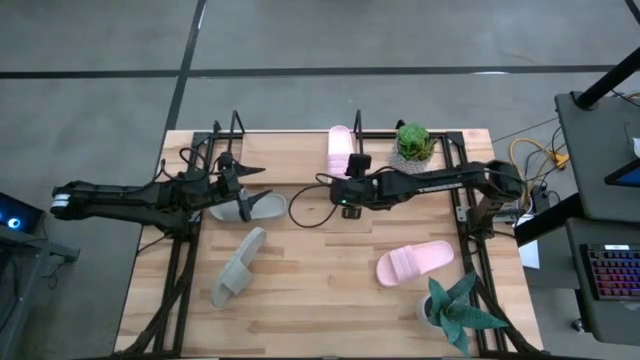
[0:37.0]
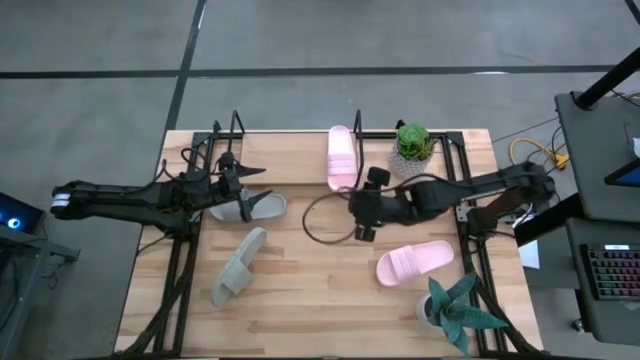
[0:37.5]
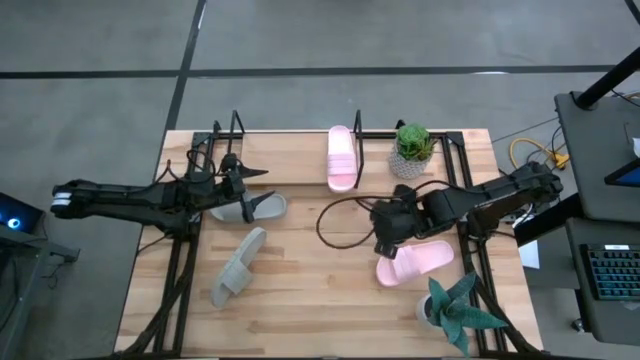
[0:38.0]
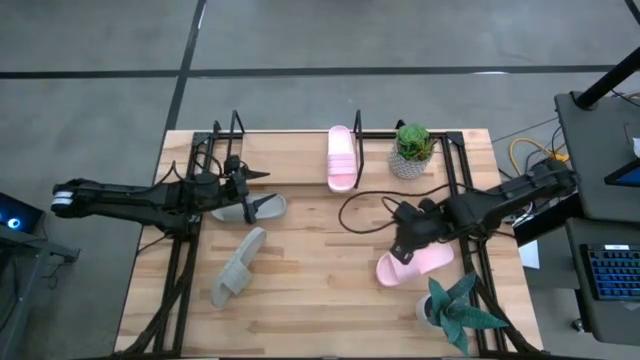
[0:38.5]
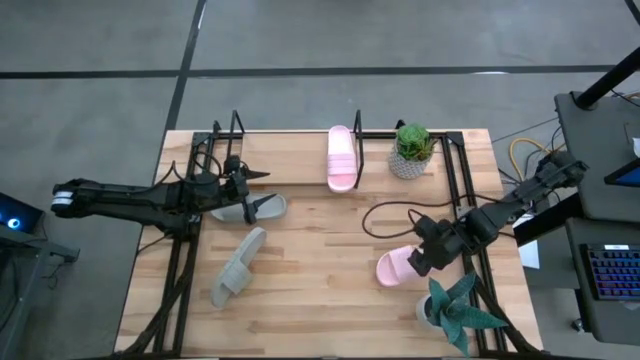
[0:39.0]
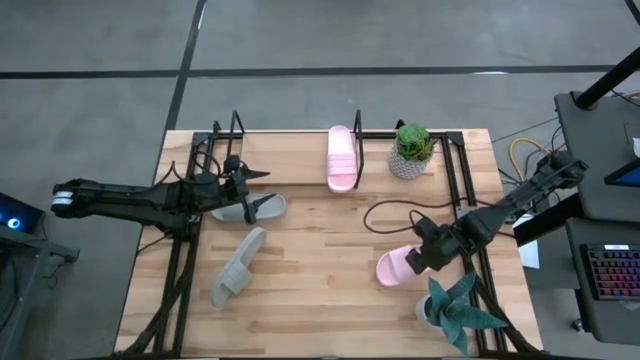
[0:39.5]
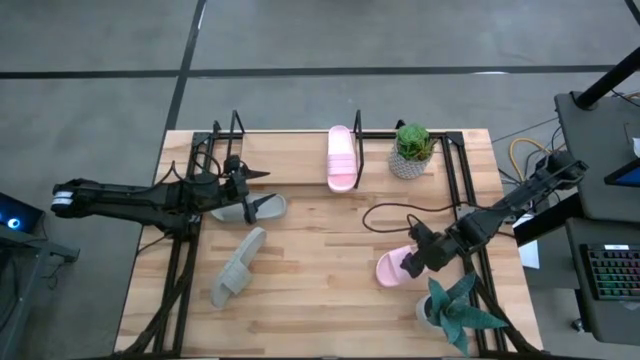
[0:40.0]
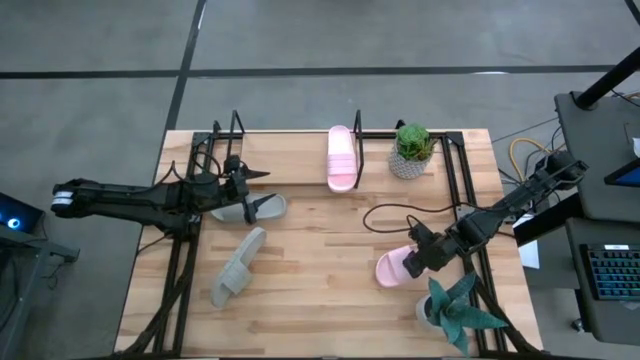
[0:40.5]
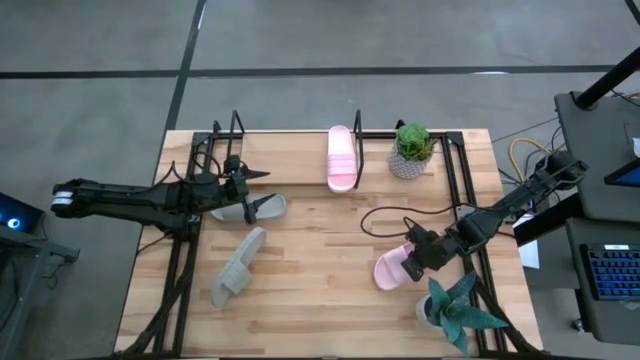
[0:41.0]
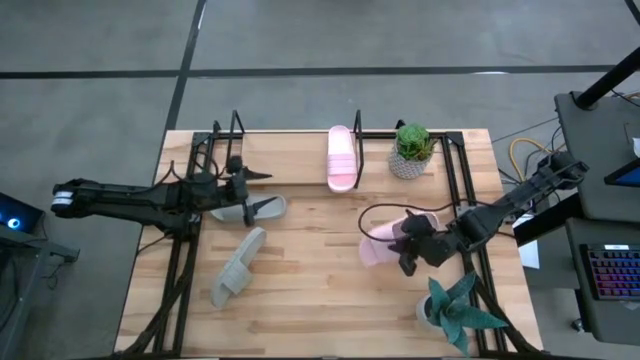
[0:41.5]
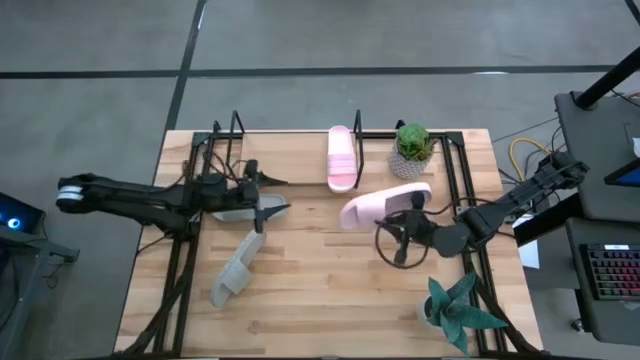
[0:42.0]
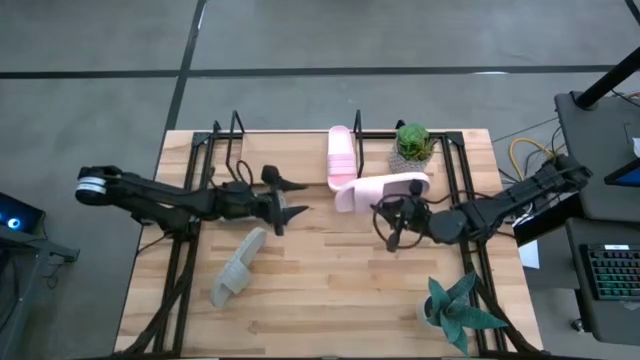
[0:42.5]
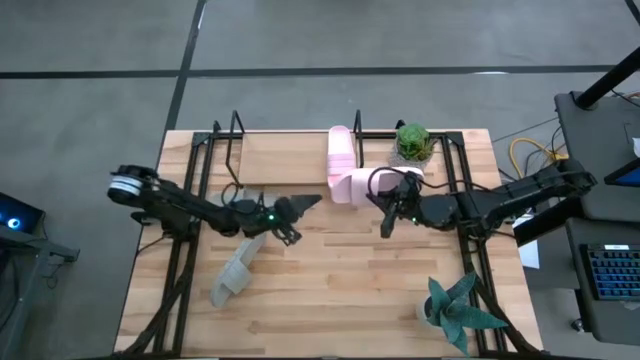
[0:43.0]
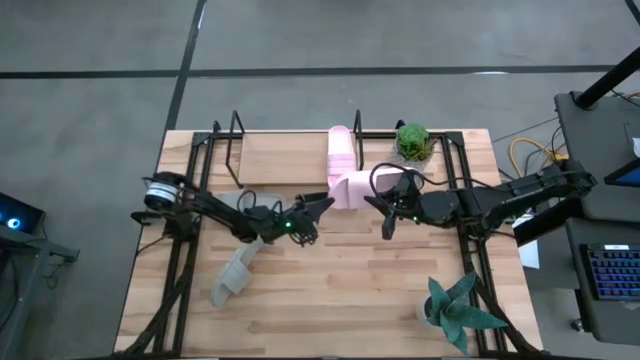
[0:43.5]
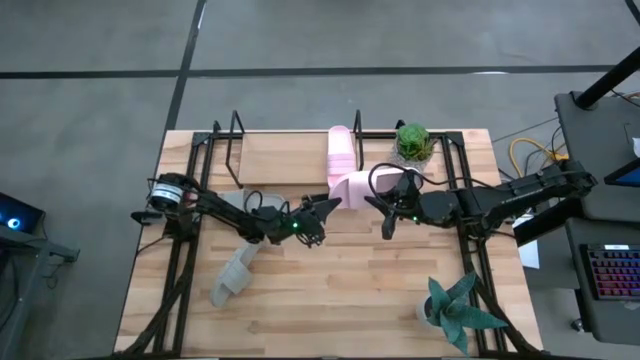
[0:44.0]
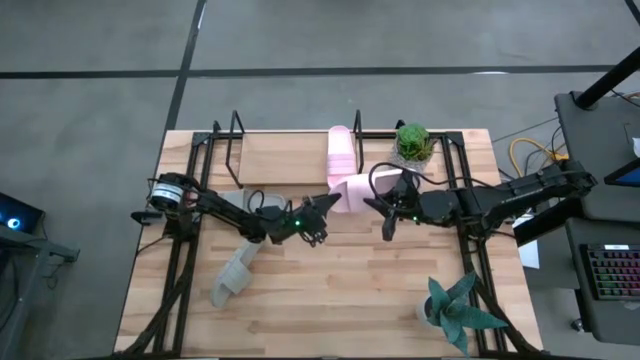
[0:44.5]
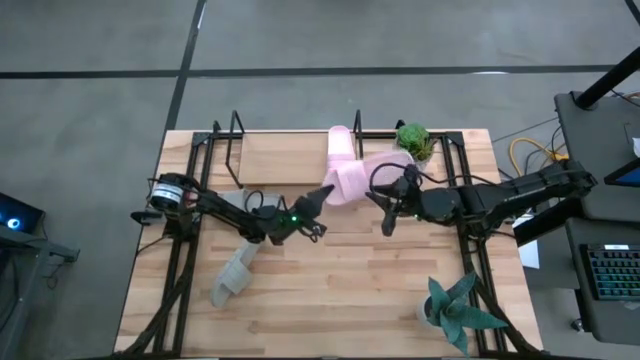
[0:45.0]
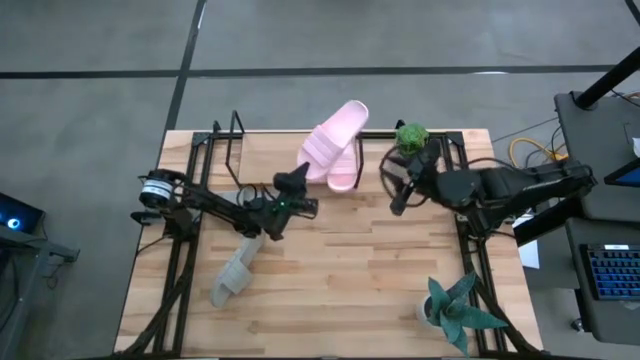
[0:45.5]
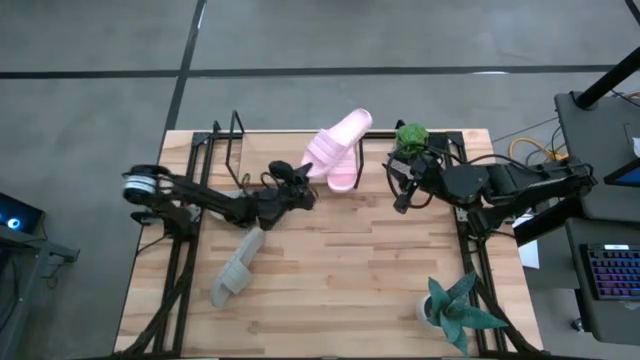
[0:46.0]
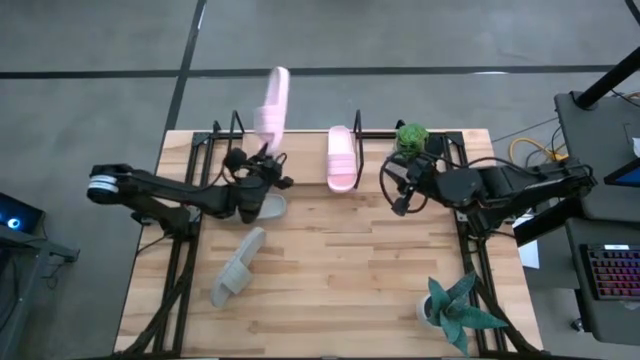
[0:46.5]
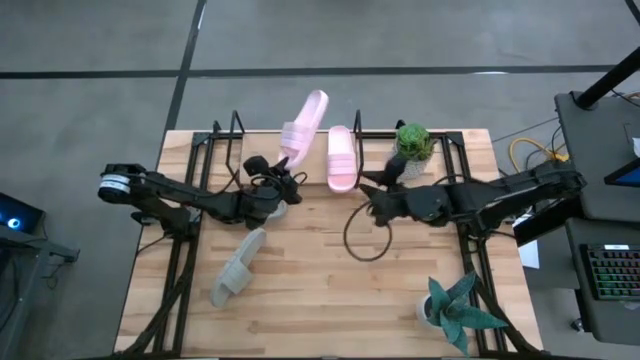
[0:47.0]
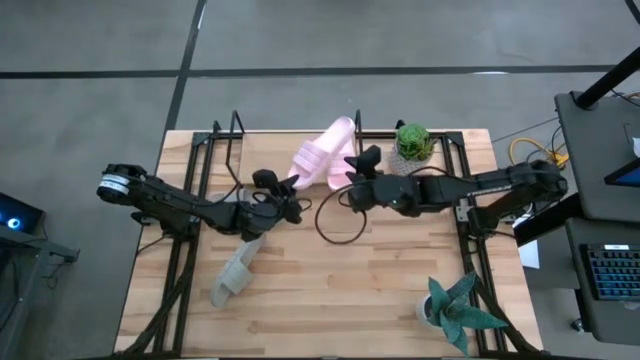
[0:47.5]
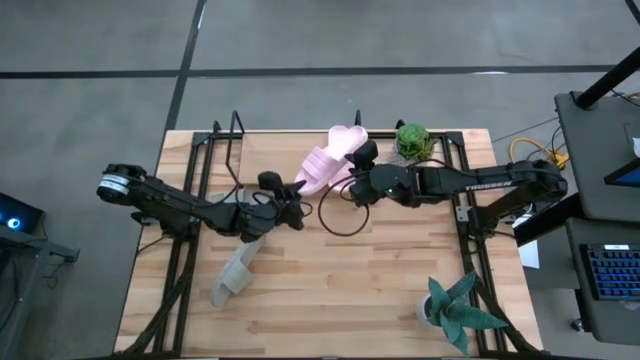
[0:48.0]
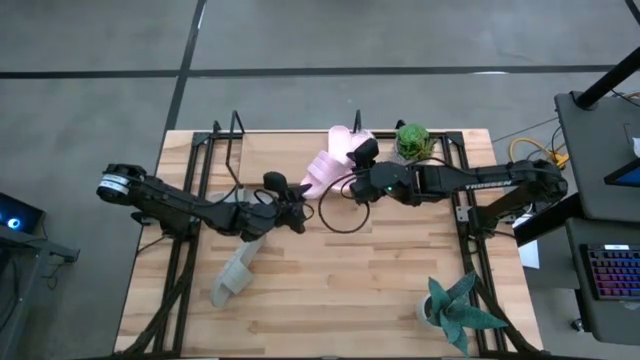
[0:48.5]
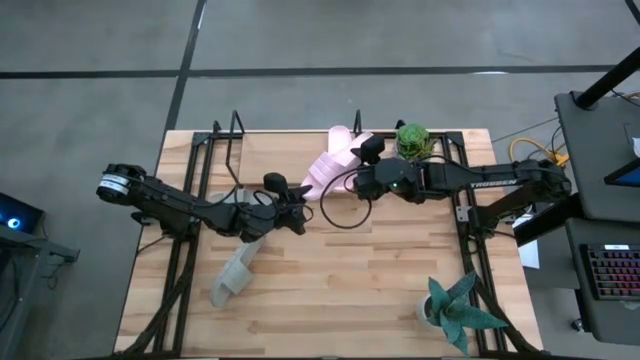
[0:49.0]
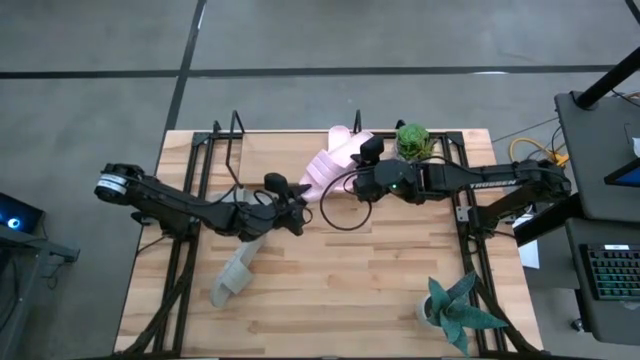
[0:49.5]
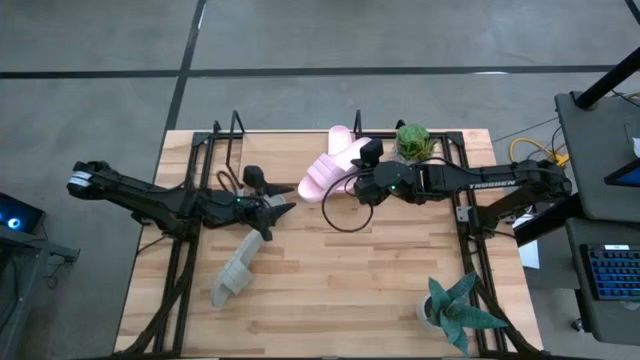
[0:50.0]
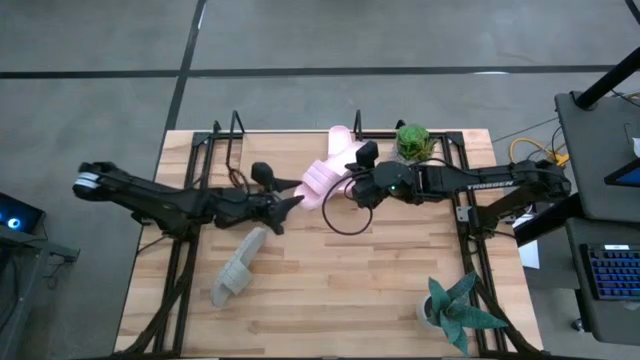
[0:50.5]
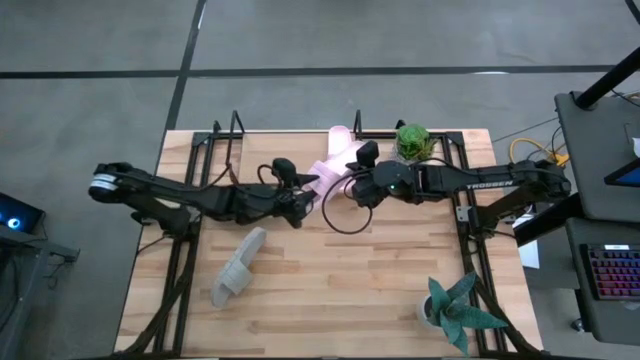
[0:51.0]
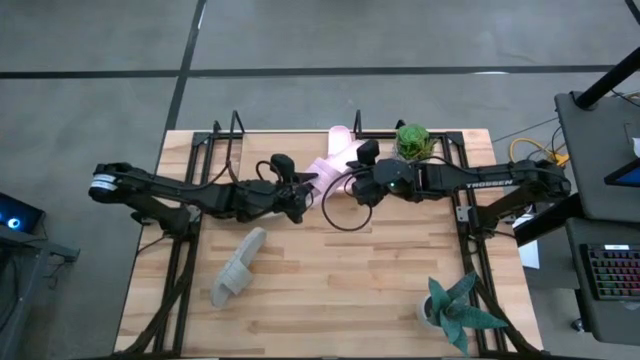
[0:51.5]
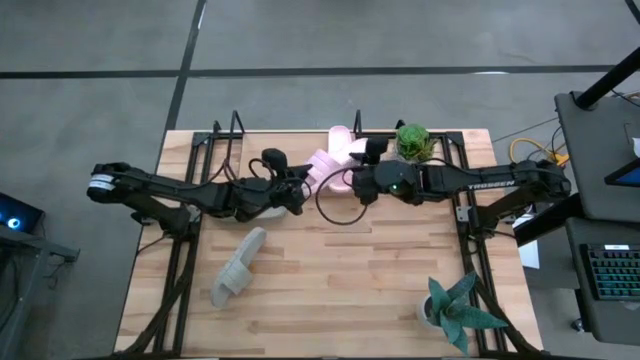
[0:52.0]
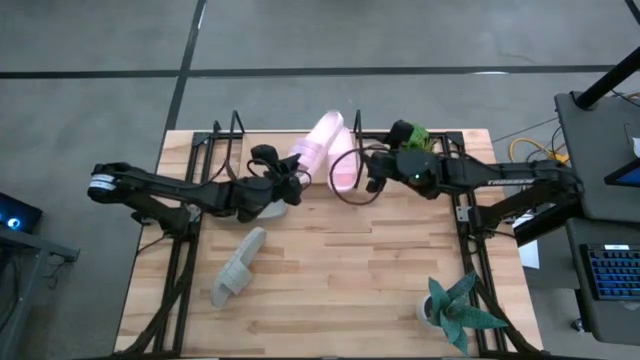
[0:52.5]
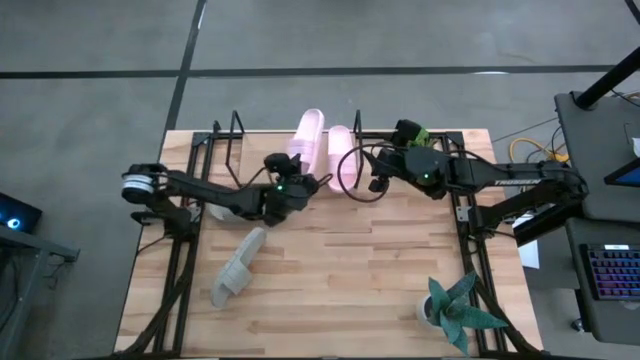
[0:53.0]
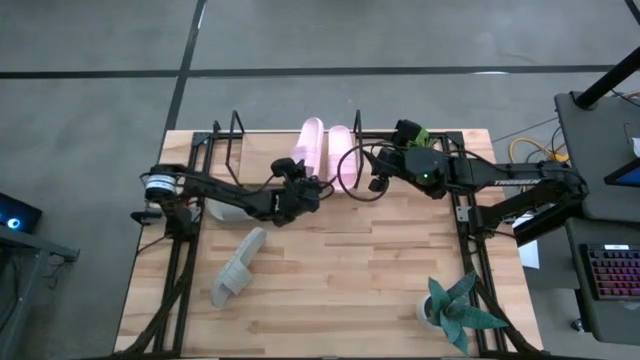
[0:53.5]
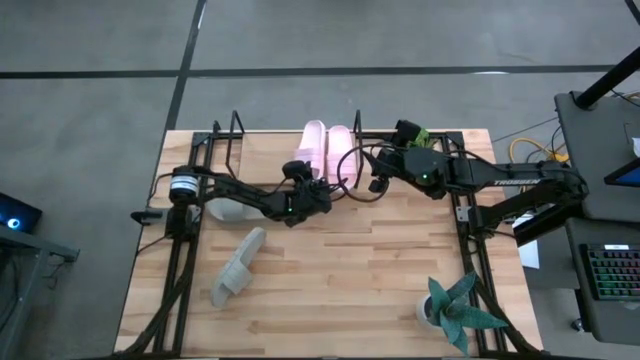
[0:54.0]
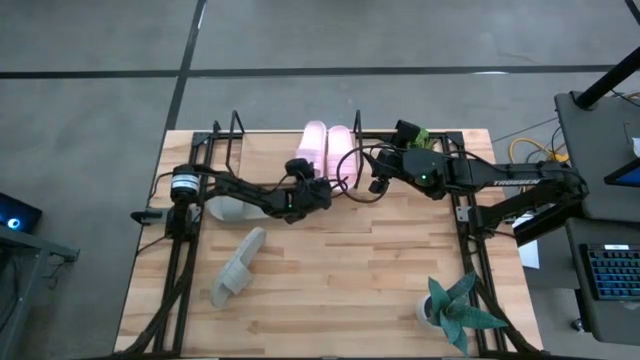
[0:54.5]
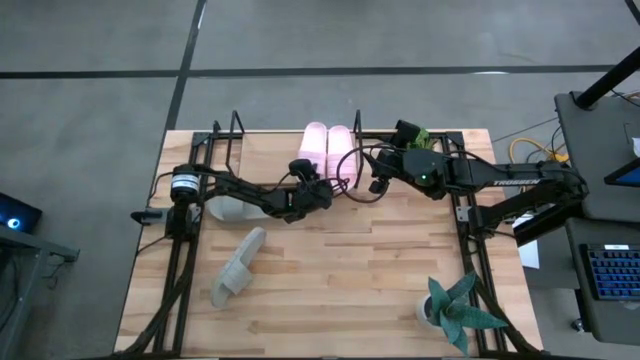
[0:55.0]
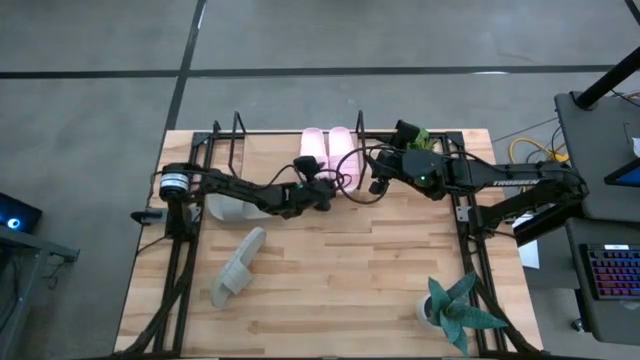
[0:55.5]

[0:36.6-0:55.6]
Task: Pick and place slides into the shelf
Put the pink slide on the shelf

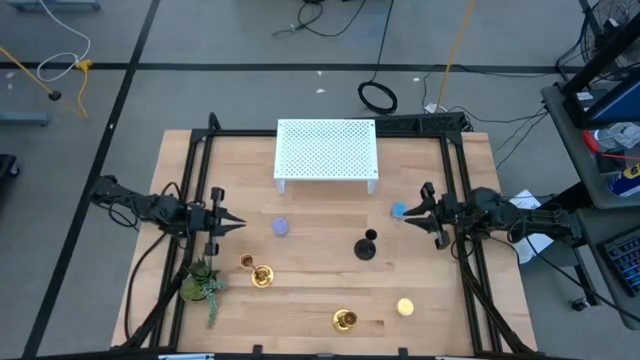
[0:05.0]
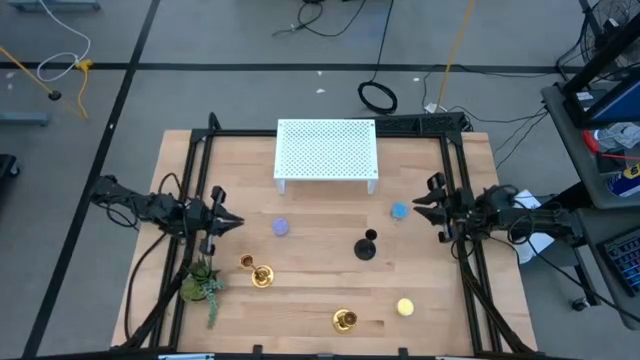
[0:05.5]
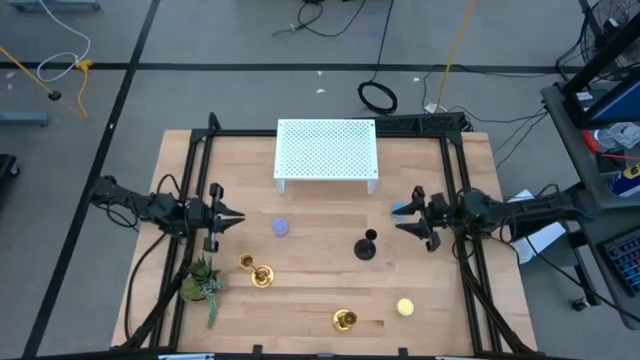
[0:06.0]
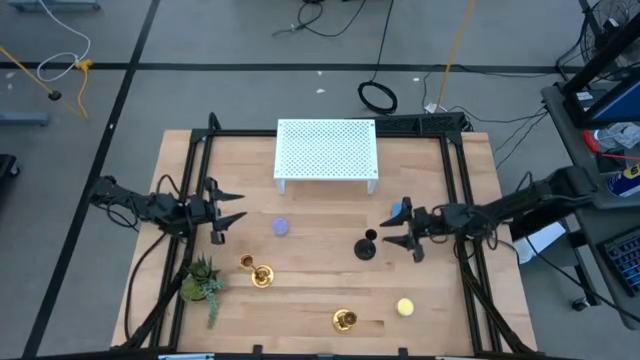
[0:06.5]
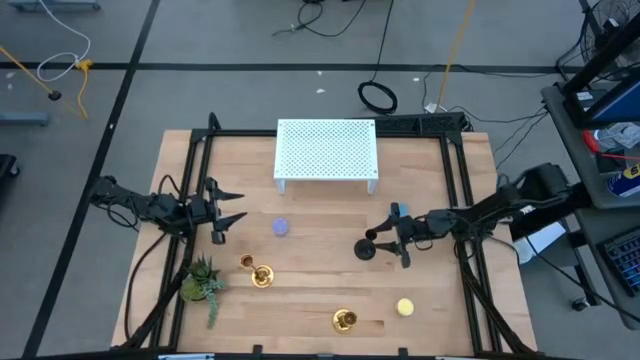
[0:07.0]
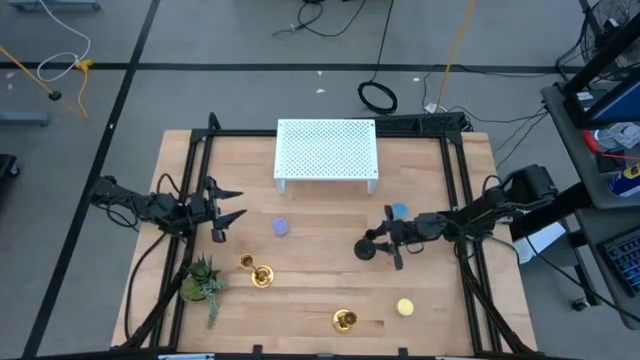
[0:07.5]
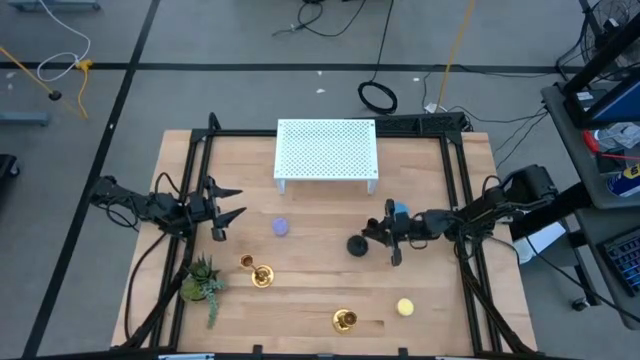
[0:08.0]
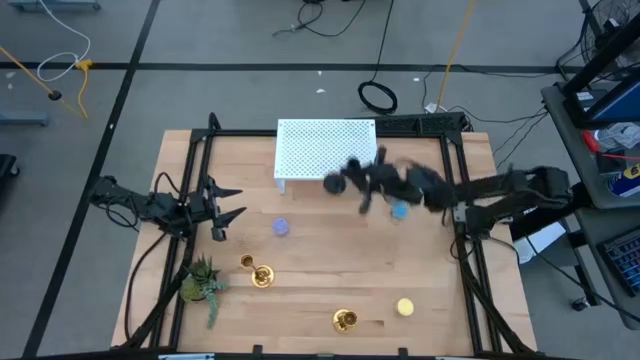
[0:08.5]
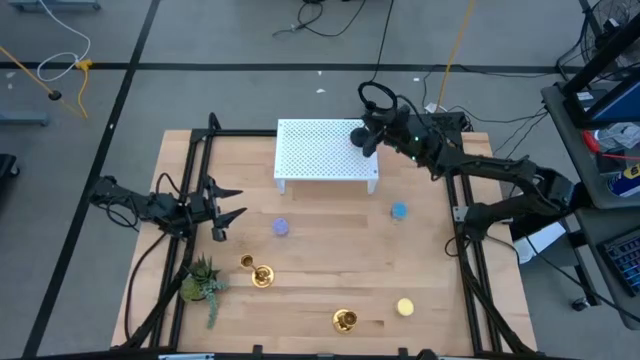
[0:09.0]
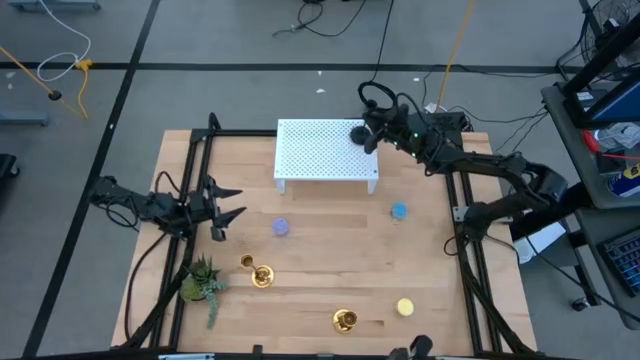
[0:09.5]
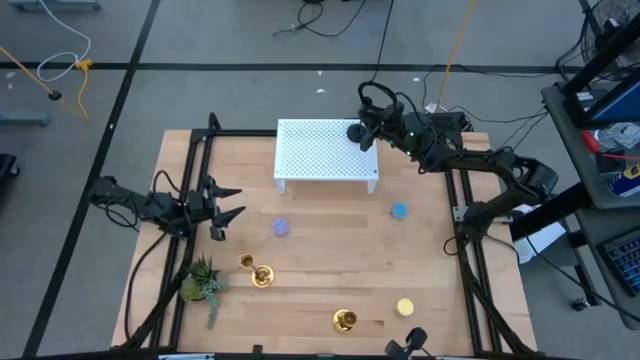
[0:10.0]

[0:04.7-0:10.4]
Task: Pick & Place candle stick holders
Put the black candle holder on the shelf
